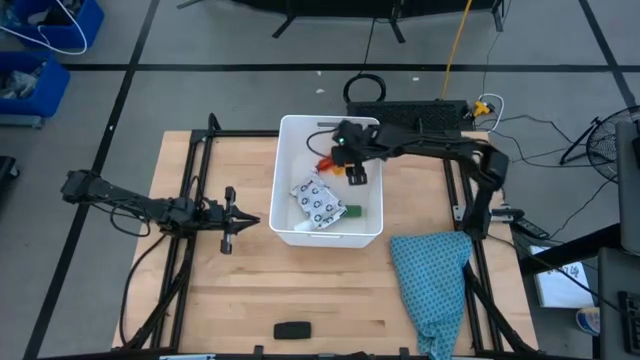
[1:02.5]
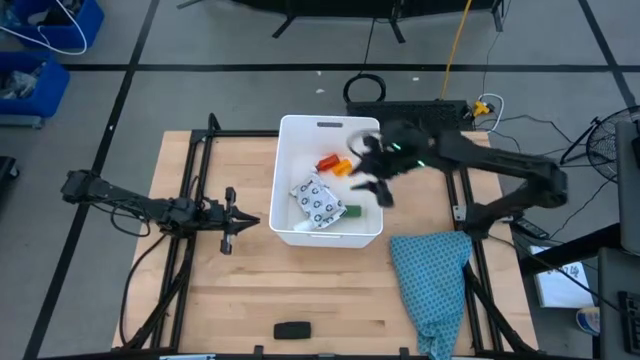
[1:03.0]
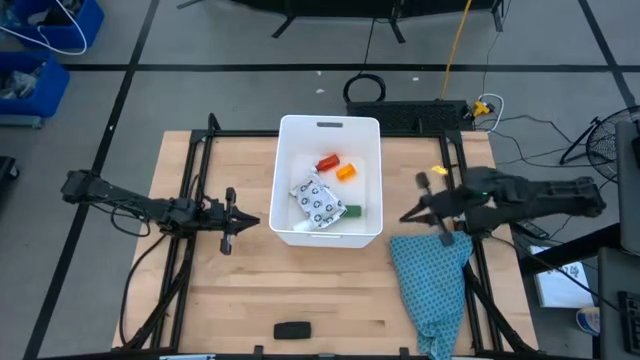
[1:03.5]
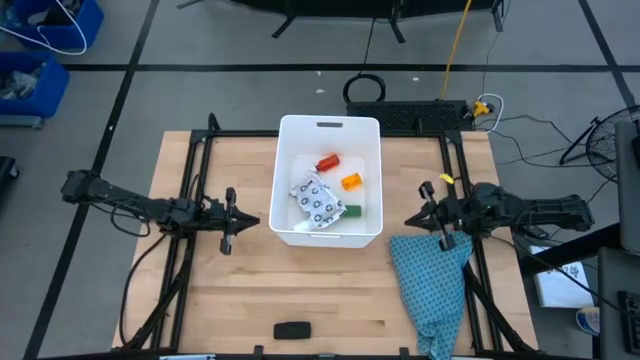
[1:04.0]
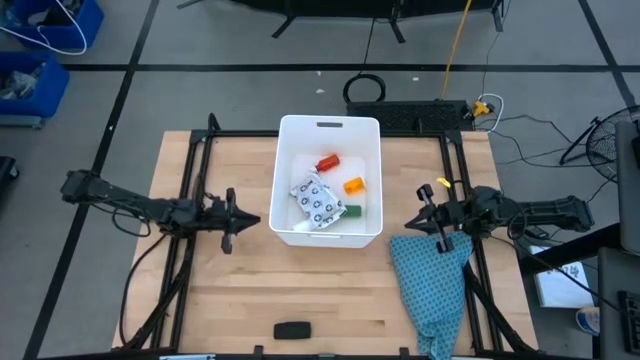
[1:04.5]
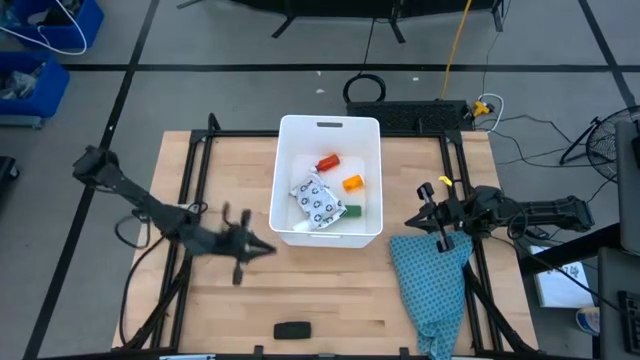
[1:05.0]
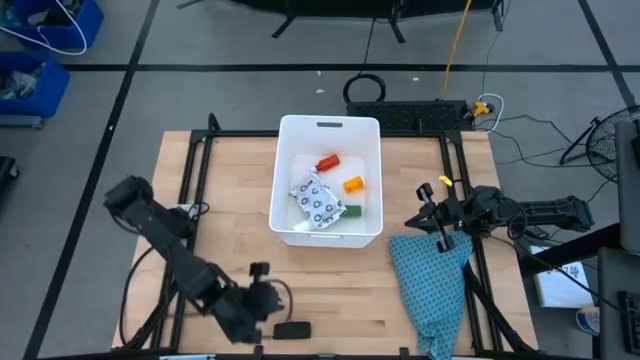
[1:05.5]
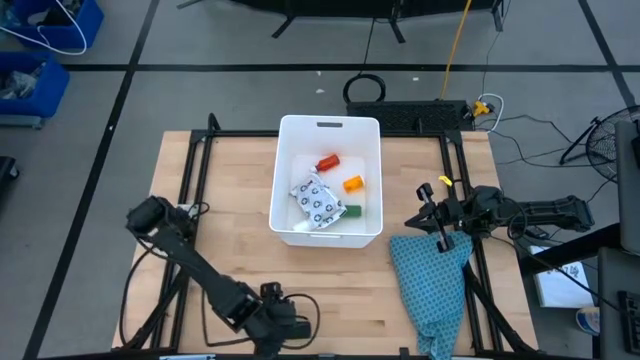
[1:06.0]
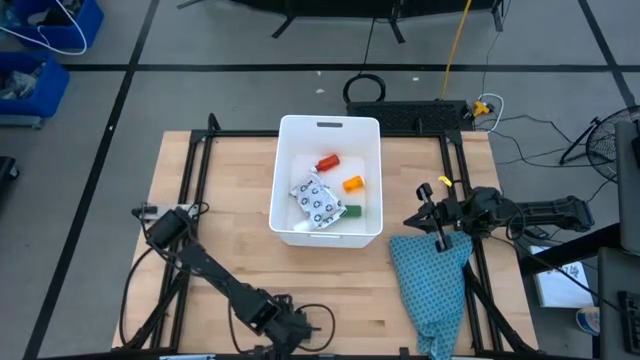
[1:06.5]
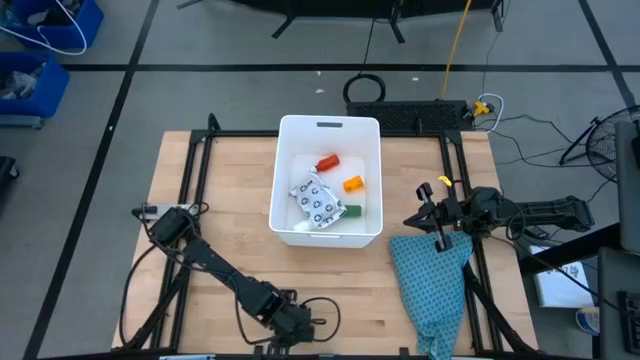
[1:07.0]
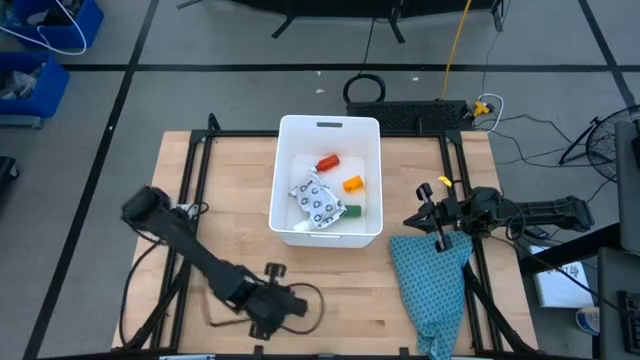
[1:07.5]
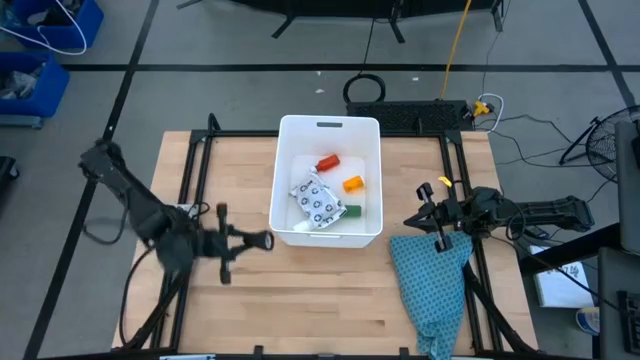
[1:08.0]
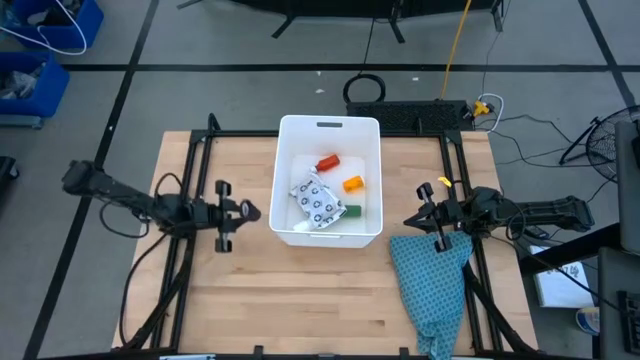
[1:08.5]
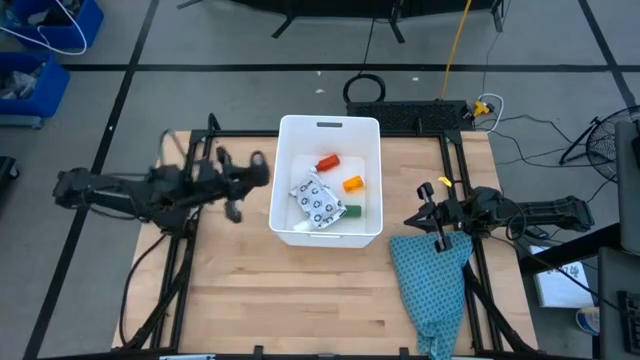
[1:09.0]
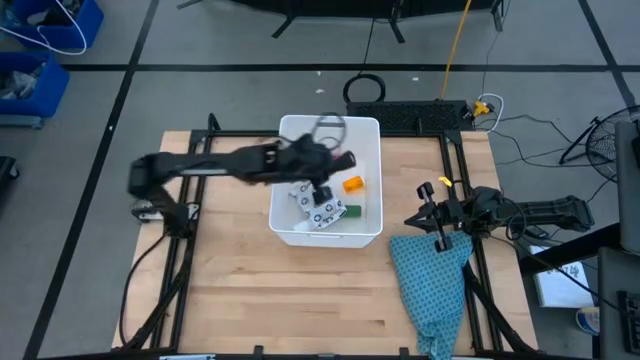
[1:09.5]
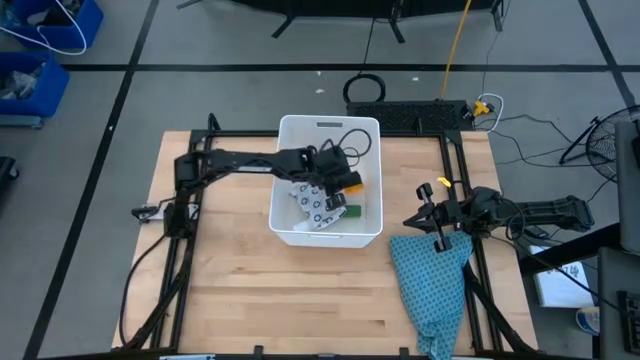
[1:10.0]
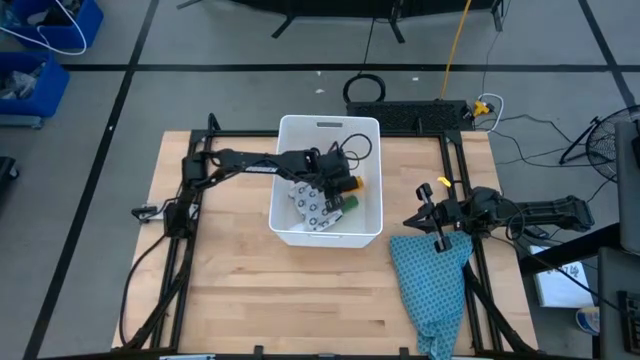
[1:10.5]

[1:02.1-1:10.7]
Task: Pick & place medical supplies in basket/bin
Put the black bandage into the basket

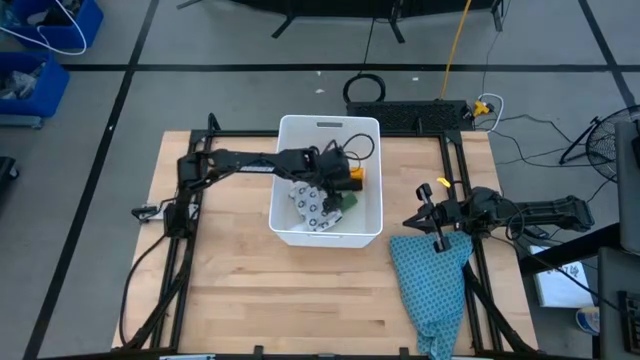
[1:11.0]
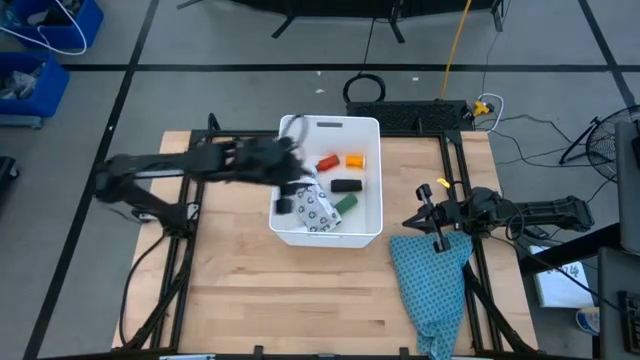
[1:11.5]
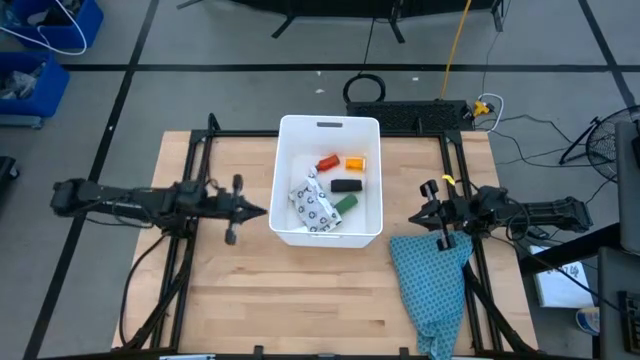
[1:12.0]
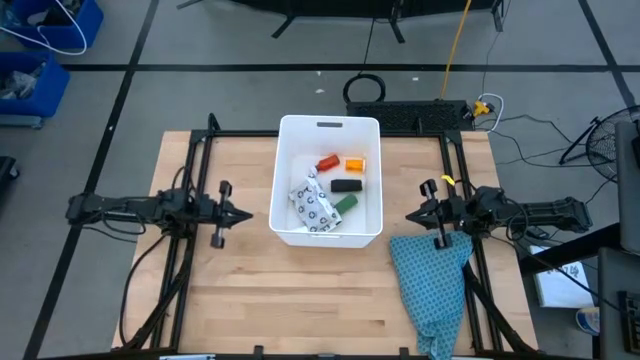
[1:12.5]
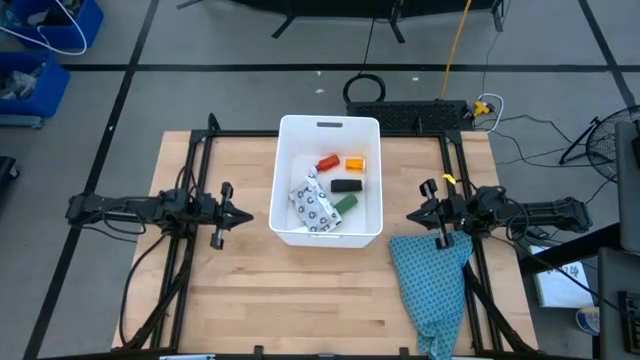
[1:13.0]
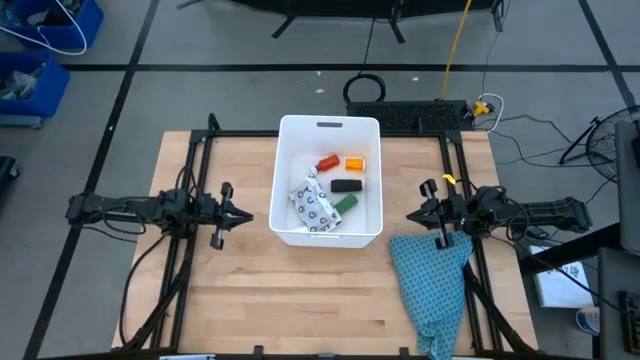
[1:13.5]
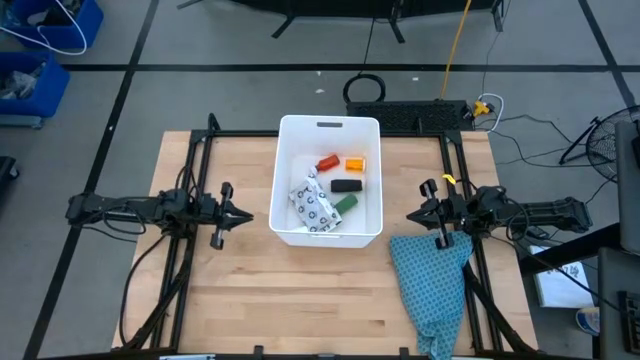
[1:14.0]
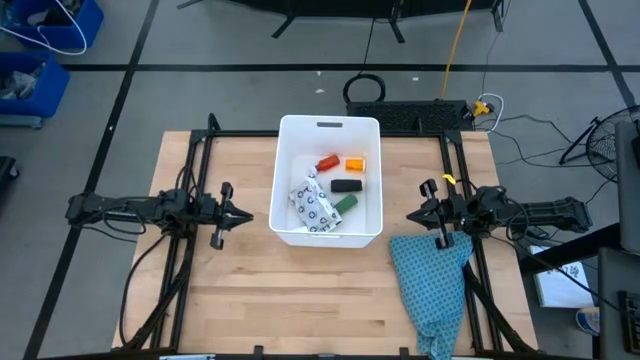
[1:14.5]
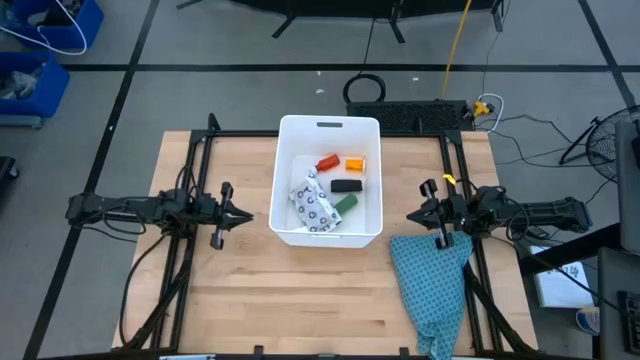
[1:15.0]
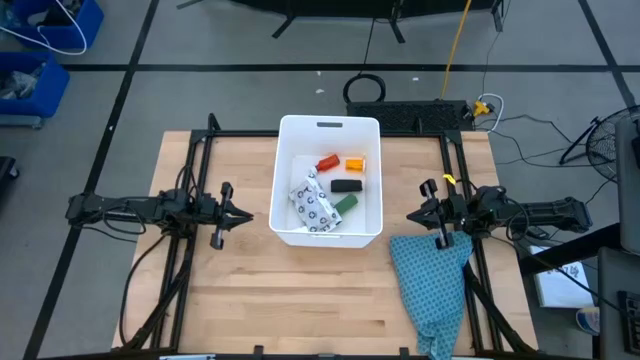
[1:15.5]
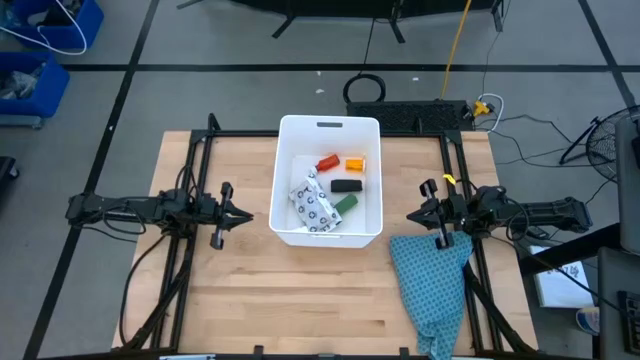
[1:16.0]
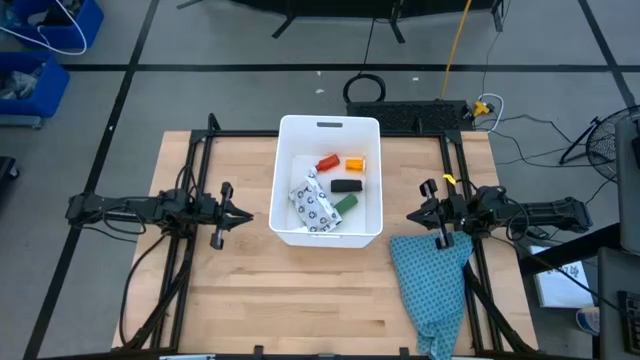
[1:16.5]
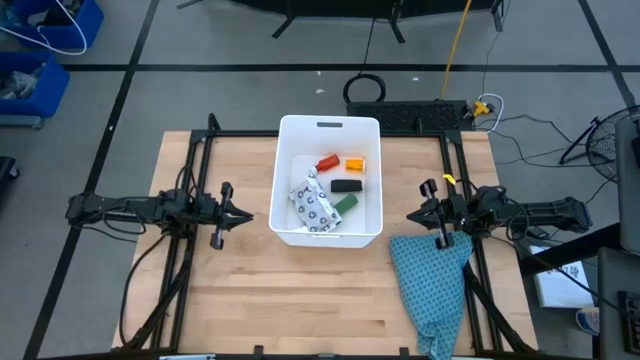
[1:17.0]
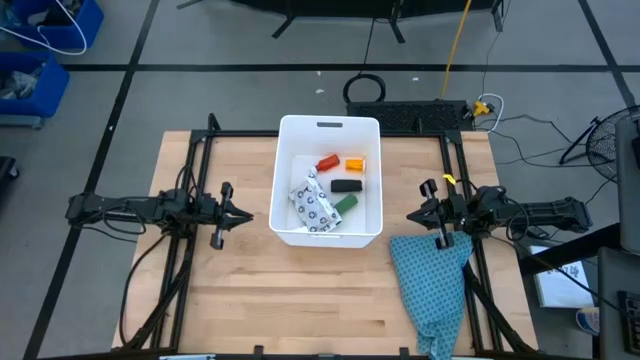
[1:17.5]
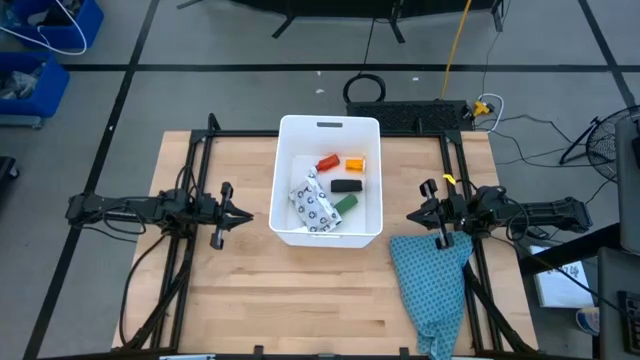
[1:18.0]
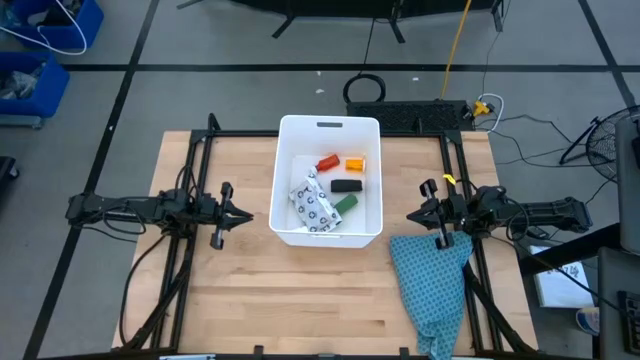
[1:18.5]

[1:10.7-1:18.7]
Return to Home Position

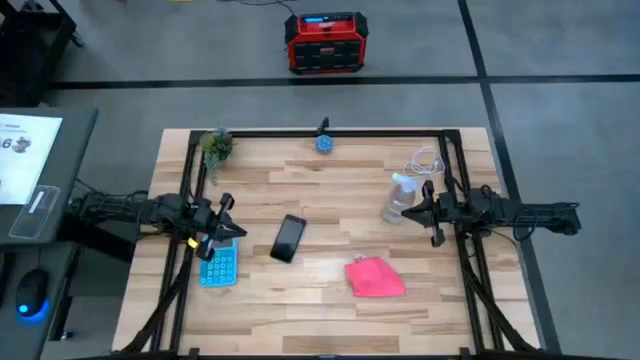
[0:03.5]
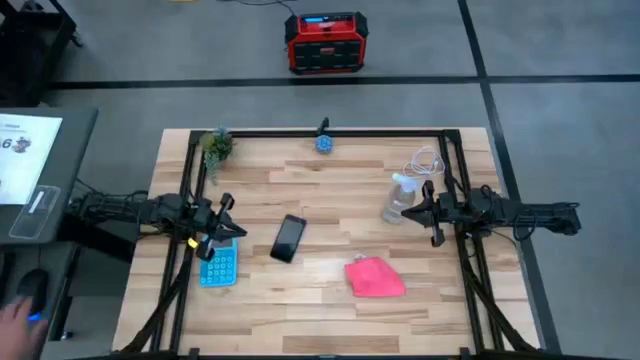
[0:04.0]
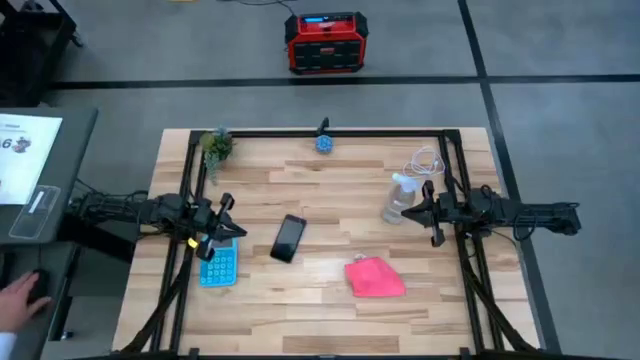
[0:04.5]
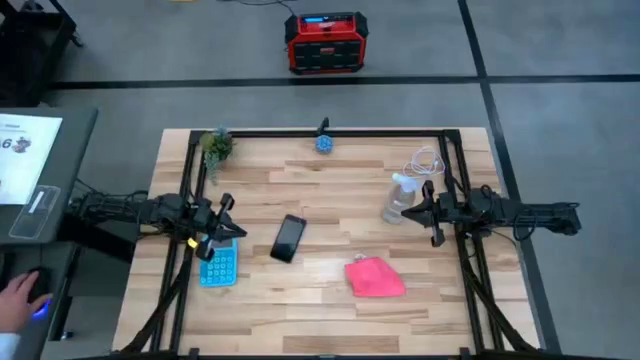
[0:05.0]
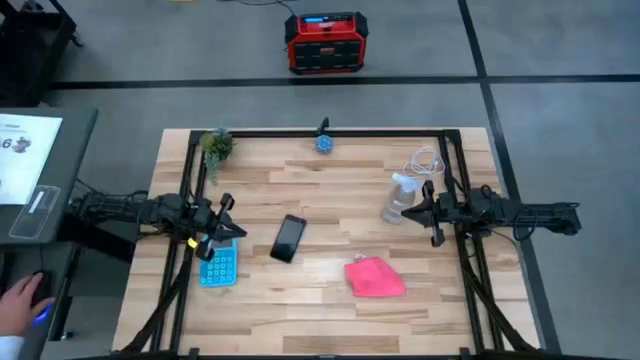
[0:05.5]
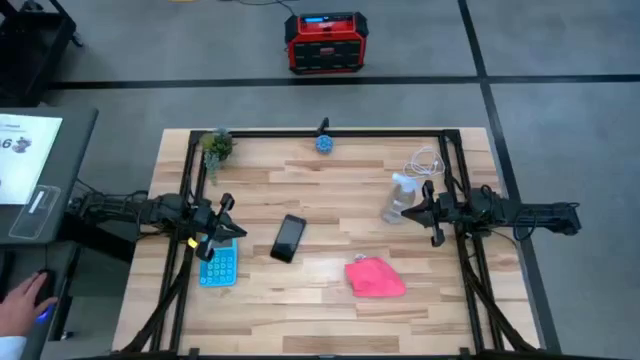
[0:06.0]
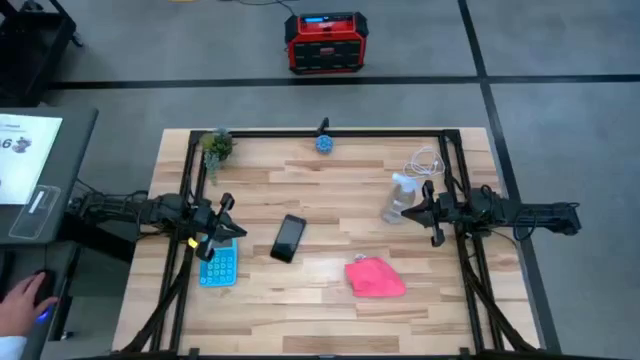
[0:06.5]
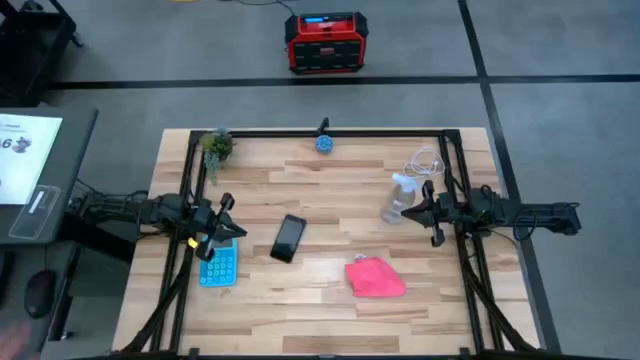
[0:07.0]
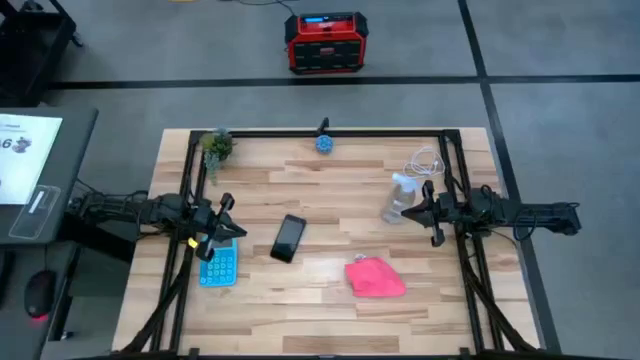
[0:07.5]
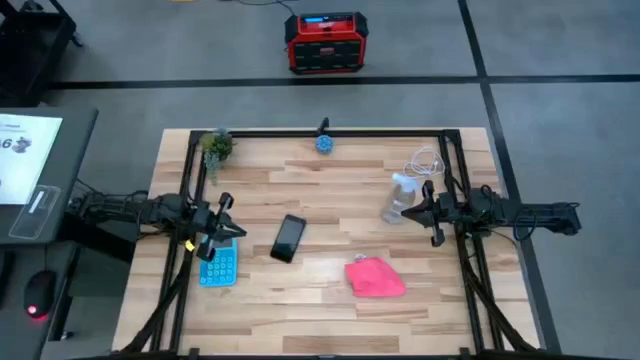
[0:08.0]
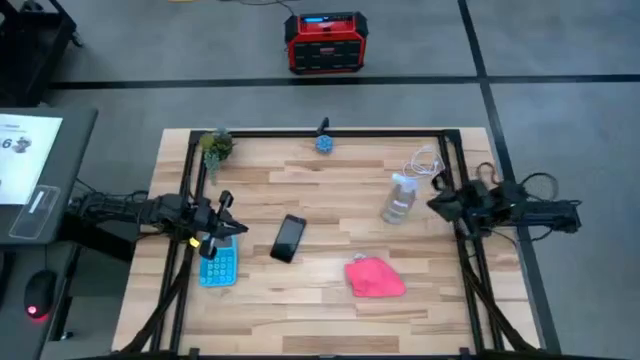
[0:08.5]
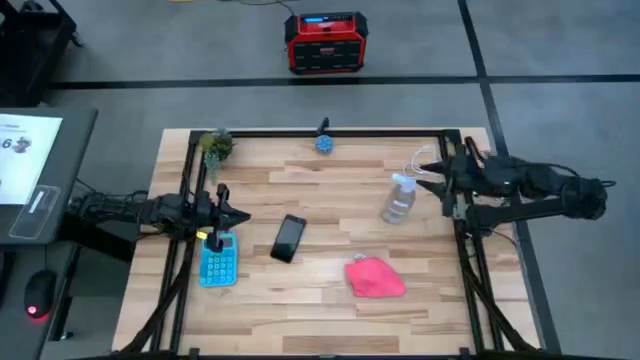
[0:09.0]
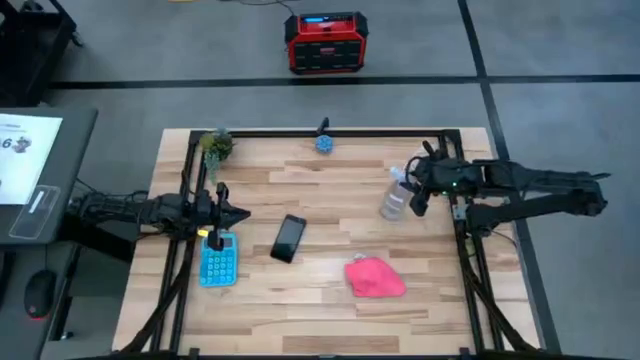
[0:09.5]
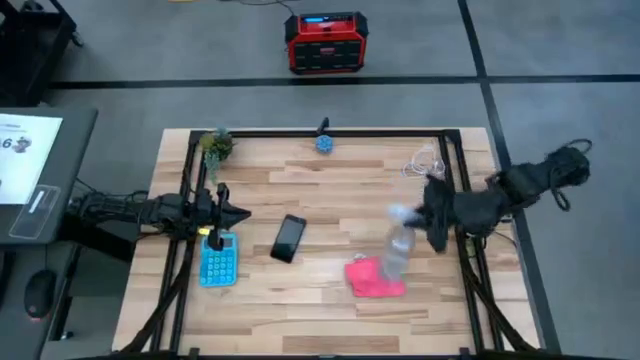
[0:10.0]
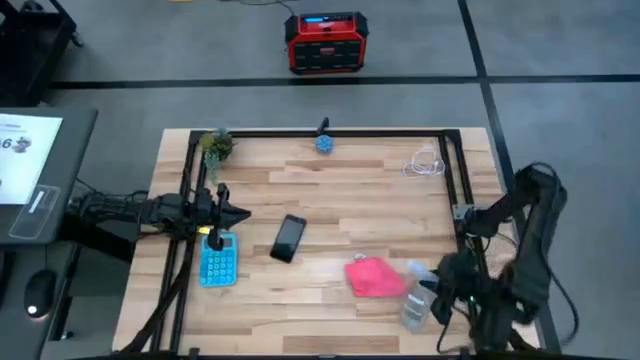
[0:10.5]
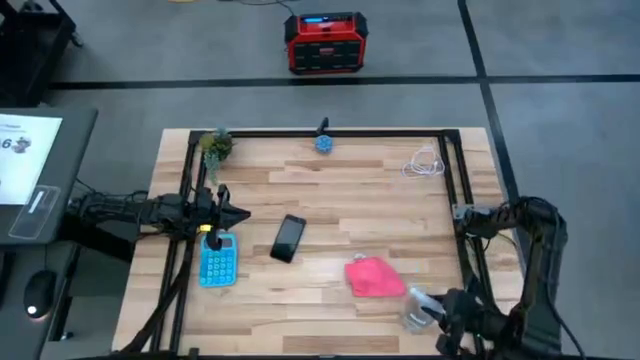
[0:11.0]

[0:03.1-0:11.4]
Task: Apply microfiber cloth
Move the transparent spray bottle to bottom right of the table
